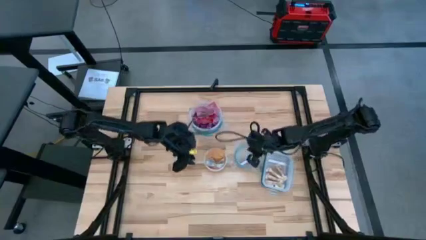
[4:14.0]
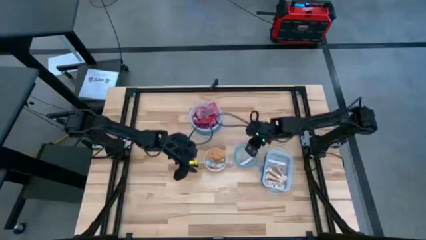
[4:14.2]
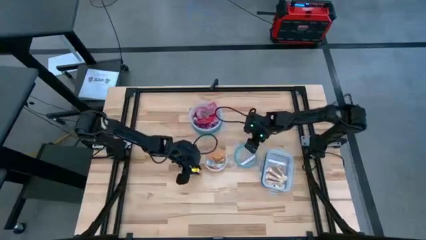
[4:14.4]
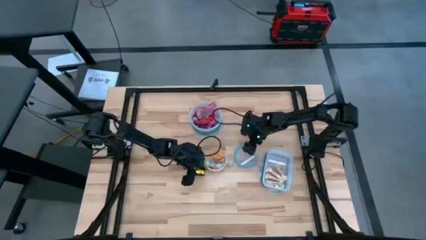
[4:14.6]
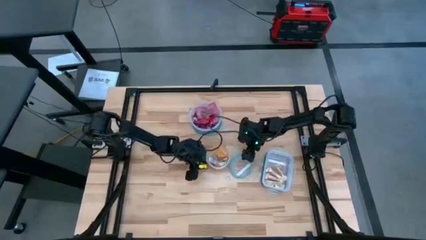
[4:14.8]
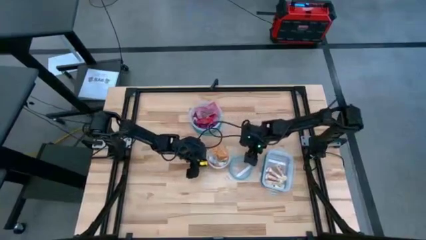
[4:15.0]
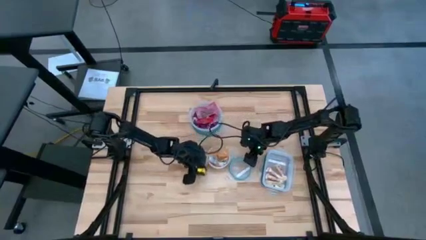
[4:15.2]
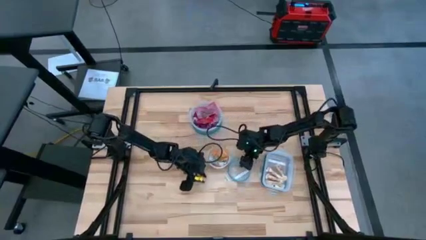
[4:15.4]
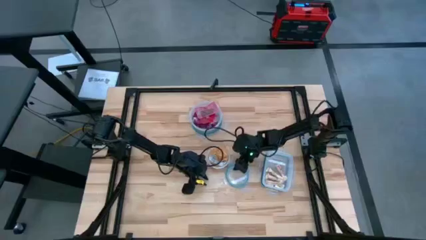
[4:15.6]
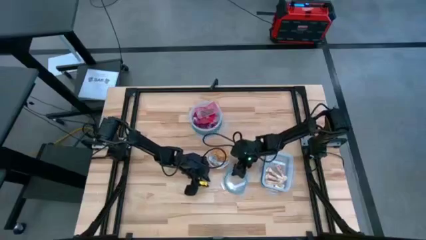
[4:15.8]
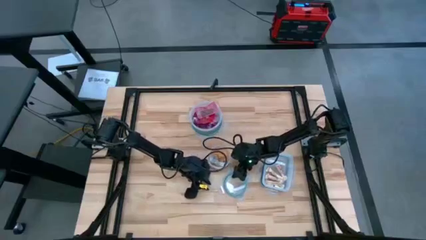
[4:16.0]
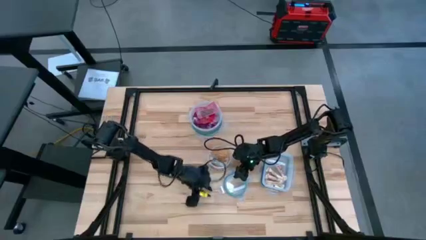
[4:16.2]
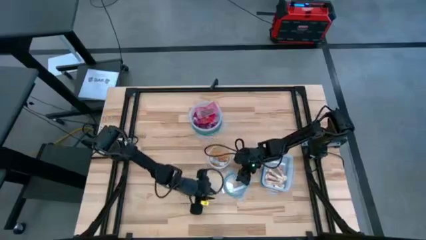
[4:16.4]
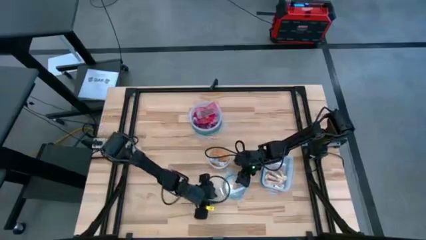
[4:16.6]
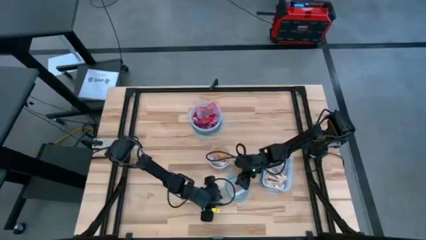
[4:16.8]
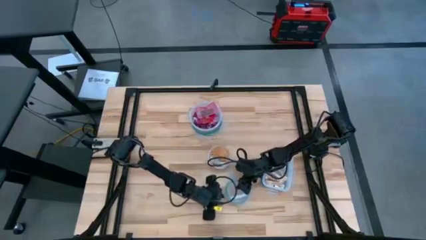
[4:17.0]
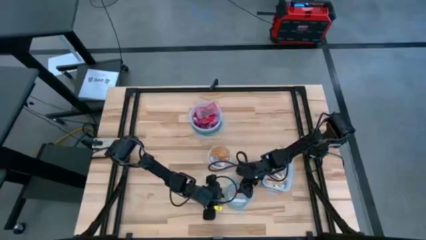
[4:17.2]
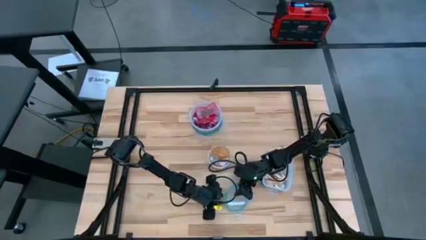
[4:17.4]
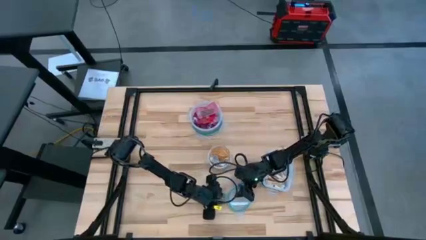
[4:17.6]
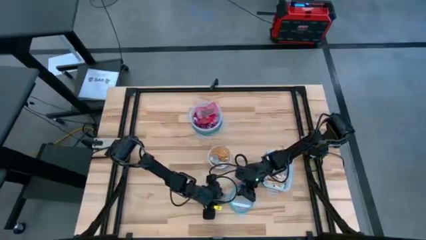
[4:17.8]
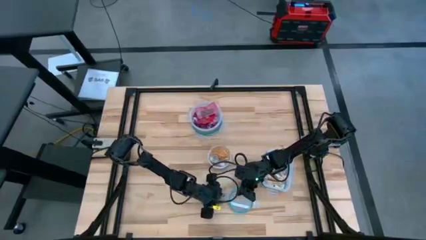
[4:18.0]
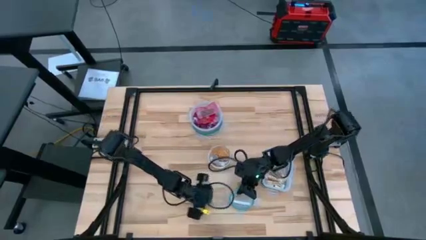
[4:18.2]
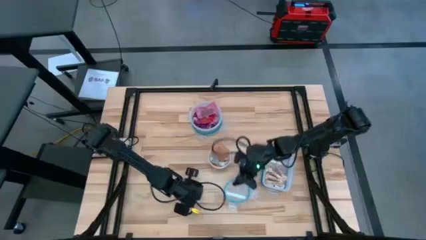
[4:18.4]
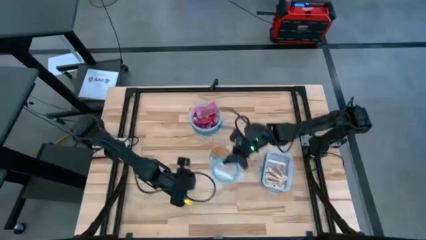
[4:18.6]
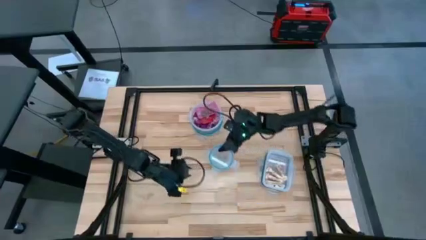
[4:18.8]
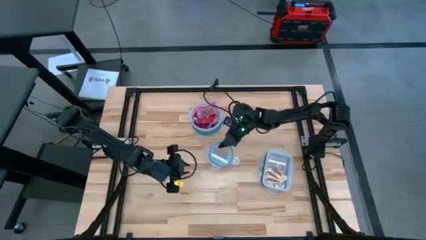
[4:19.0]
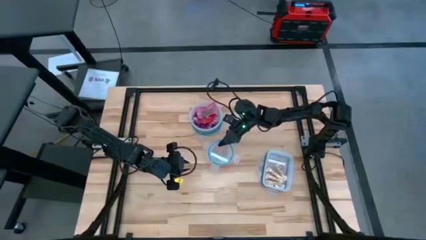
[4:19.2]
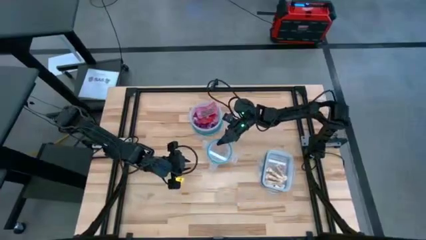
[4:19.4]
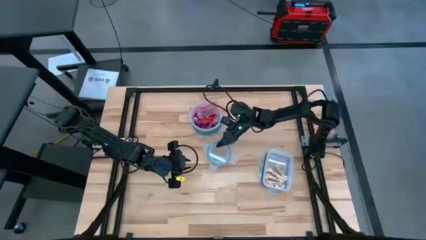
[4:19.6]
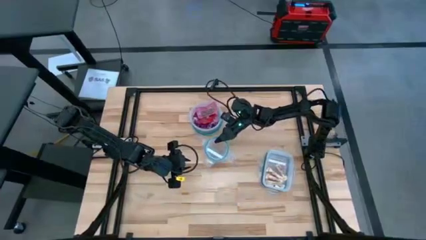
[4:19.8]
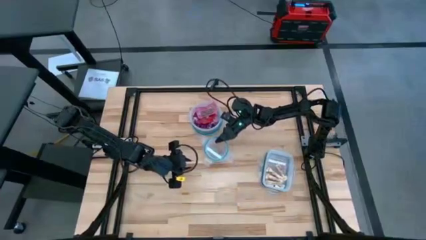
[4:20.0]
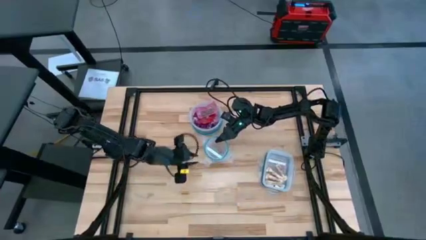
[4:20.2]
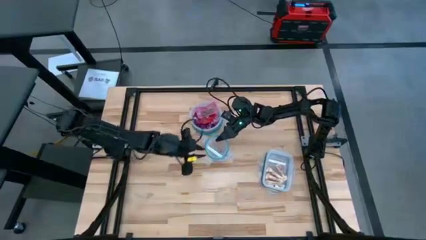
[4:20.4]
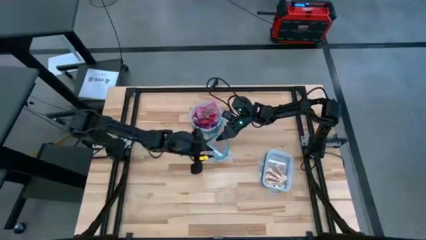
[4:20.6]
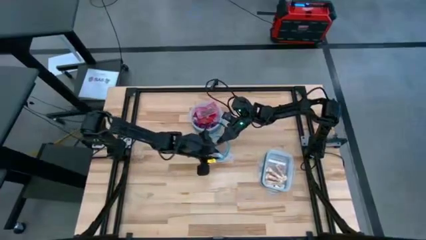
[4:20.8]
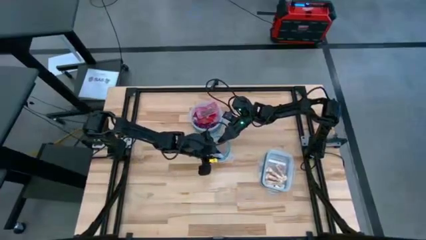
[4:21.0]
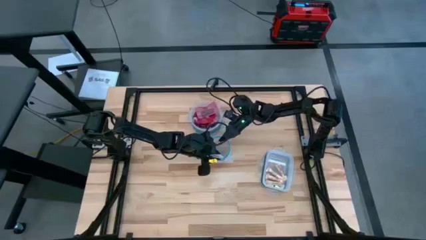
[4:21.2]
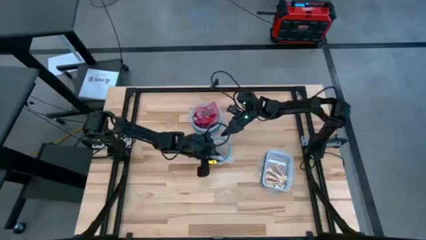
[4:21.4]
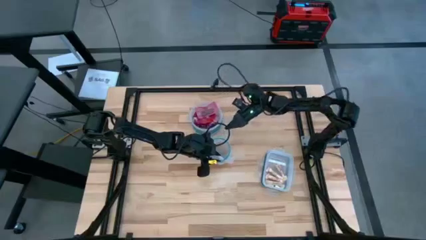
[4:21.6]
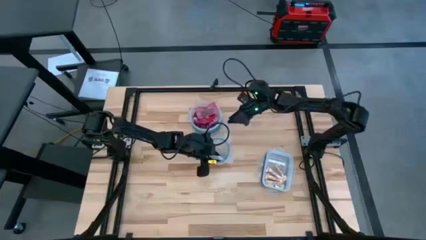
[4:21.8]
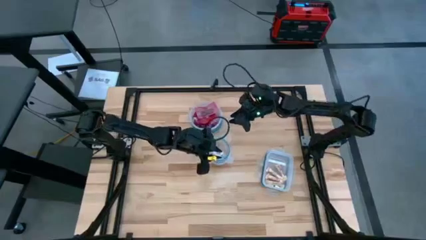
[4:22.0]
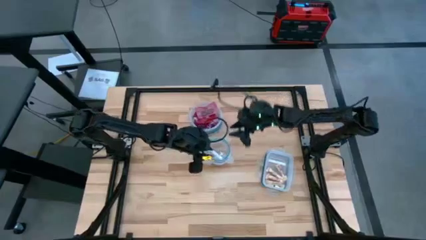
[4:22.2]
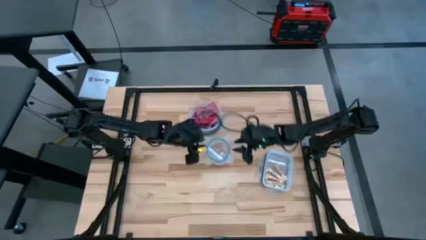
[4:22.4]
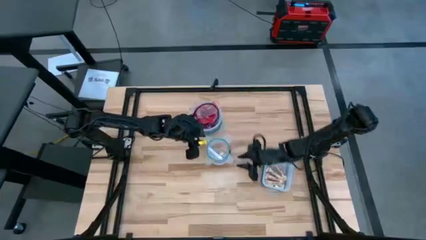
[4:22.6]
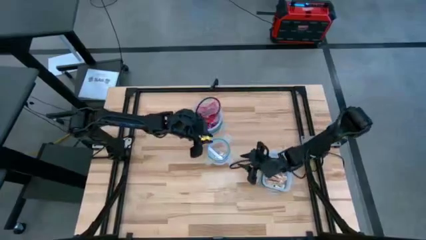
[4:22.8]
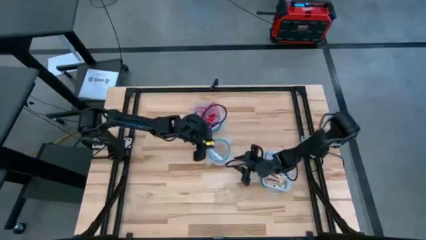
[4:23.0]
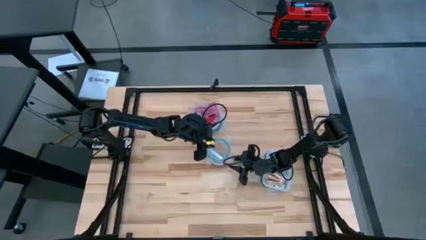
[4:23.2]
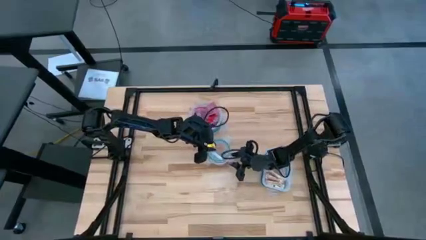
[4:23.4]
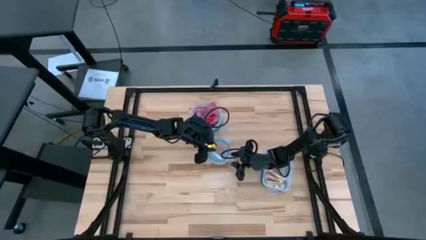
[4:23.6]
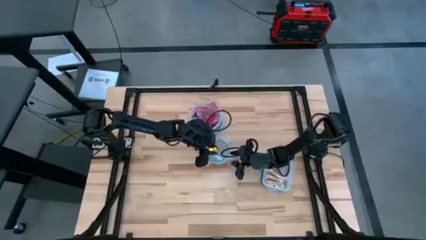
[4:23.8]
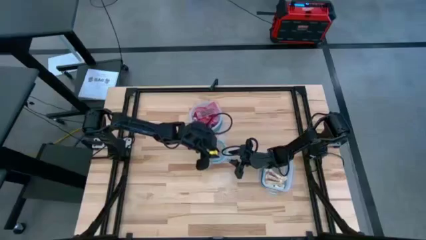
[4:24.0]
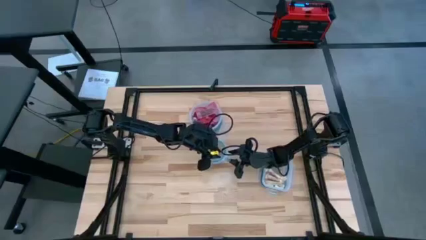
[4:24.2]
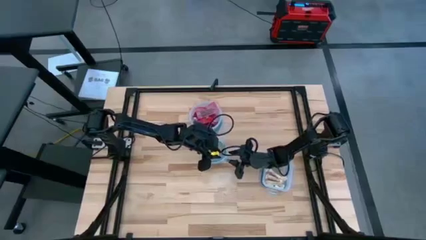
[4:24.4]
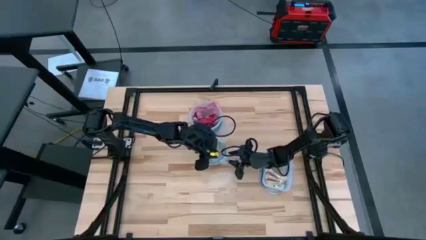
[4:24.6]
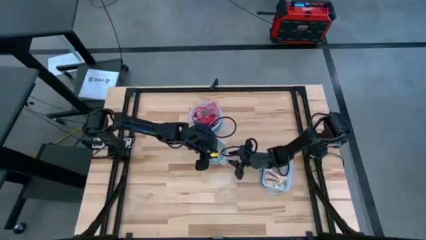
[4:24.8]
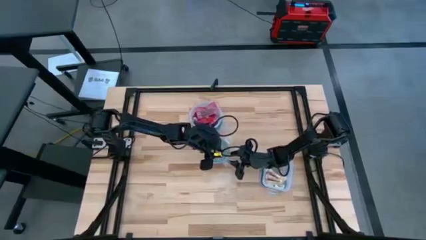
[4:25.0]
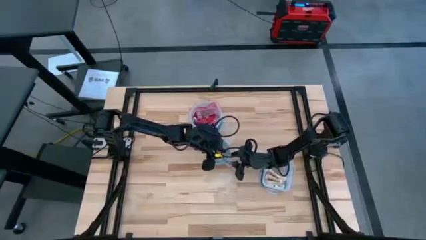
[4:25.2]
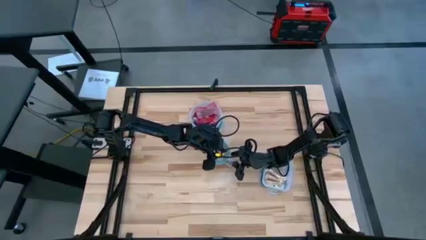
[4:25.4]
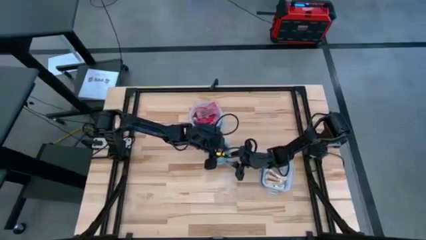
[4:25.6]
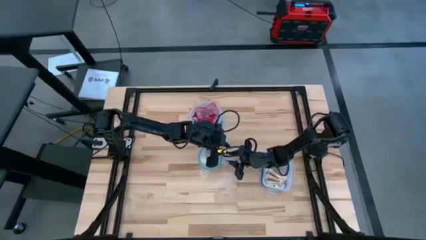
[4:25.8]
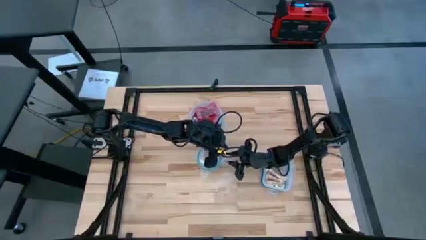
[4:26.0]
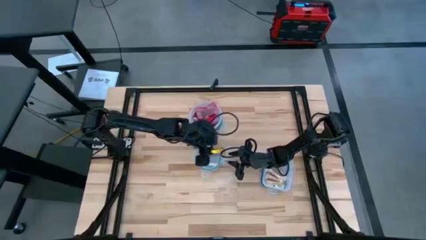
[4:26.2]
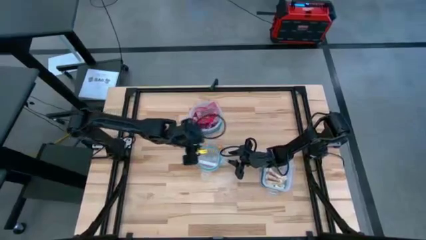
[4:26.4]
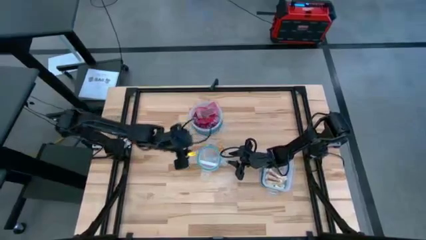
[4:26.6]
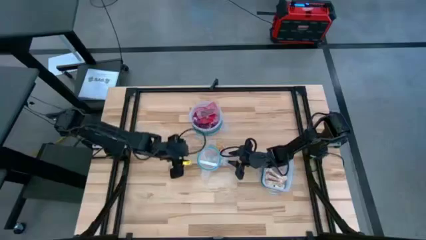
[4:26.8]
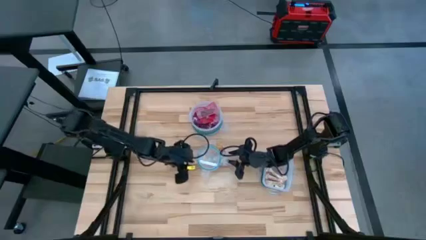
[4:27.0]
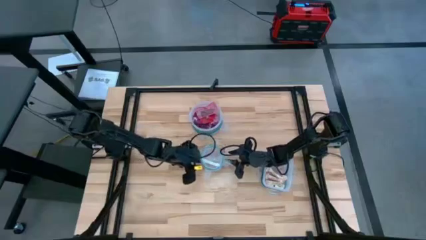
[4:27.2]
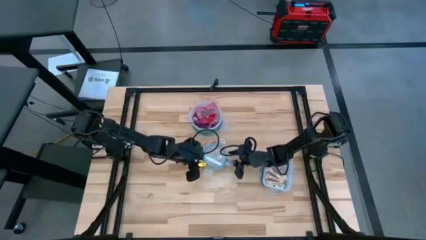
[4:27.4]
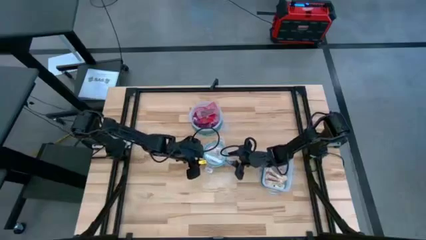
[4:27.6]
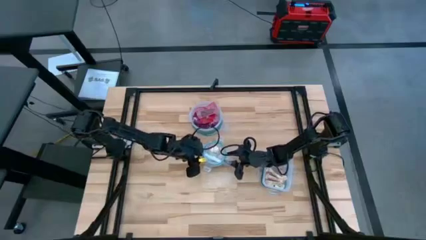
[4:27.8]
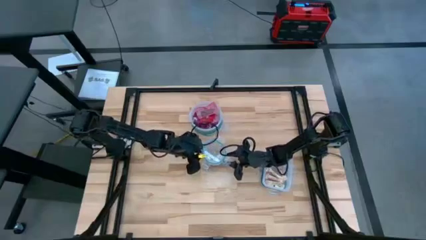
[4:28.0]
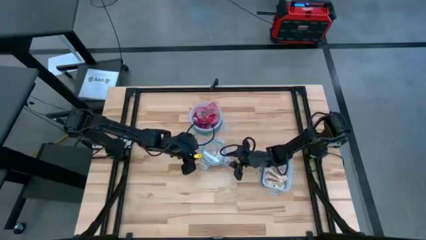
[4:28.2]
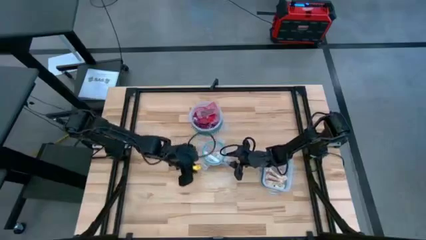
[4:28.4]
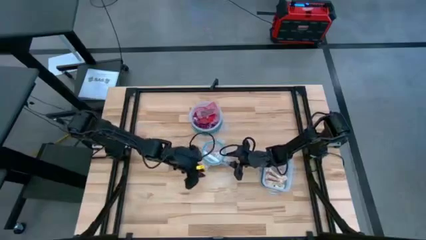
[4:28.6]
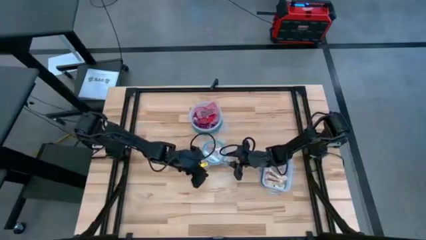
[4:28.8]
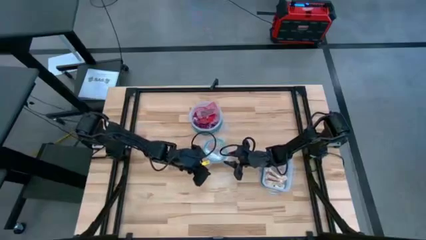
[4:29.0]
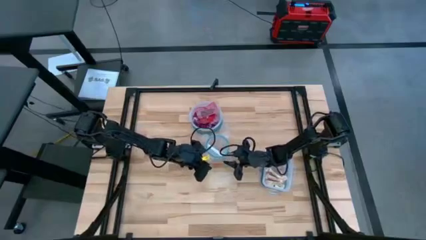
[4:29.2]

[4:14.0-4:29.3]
Task: Sort candy
Close the small circular transparent bin
